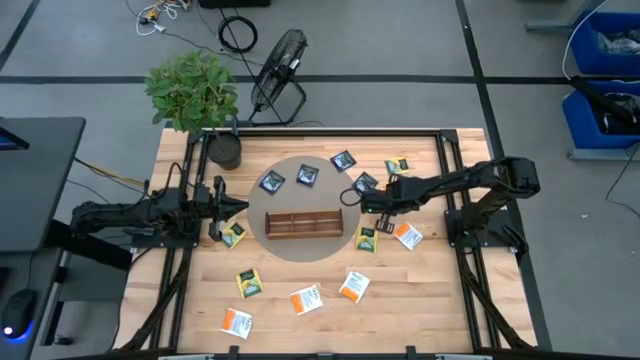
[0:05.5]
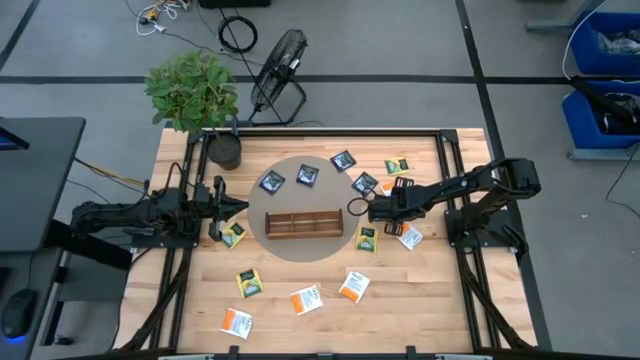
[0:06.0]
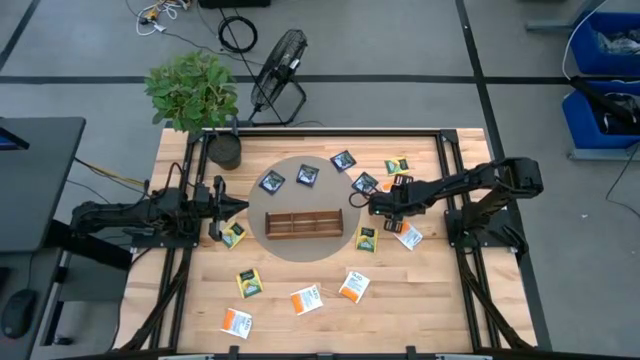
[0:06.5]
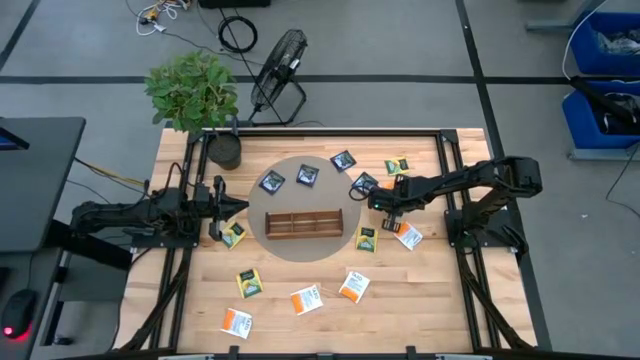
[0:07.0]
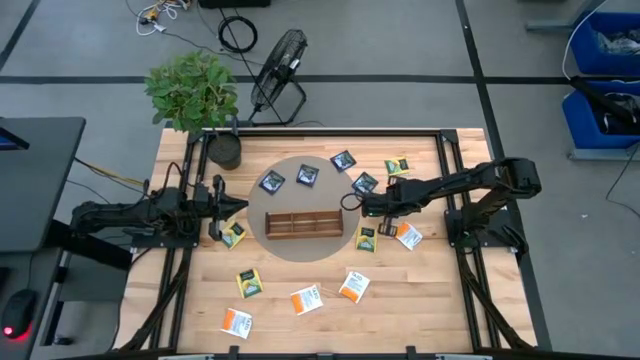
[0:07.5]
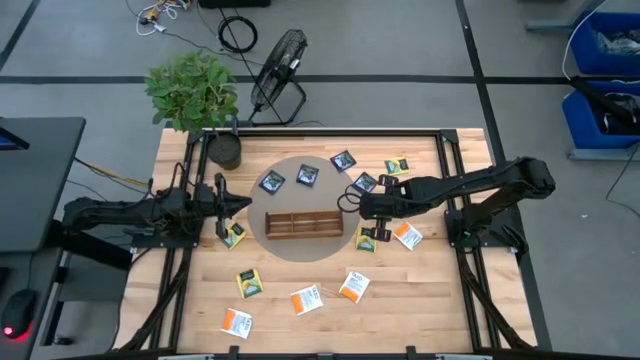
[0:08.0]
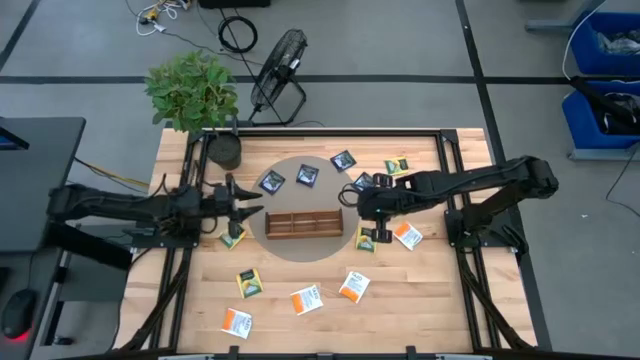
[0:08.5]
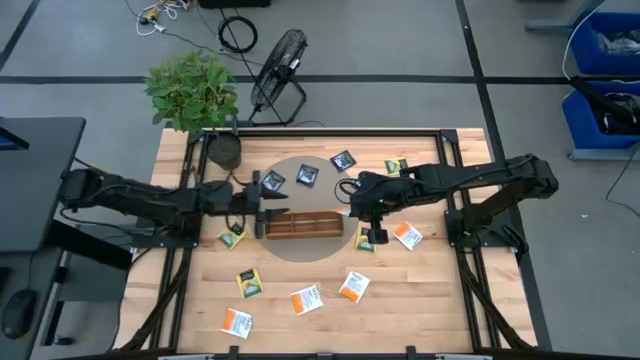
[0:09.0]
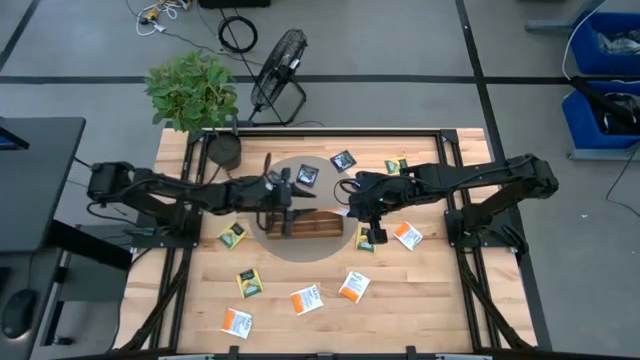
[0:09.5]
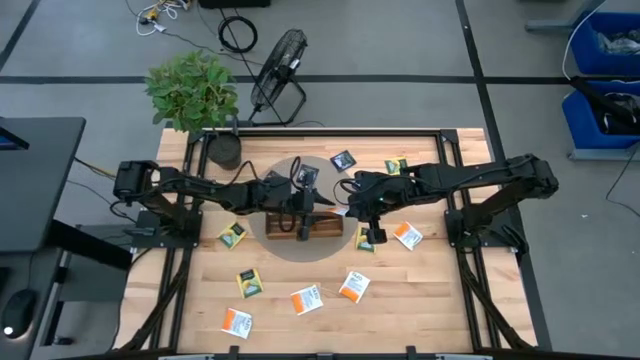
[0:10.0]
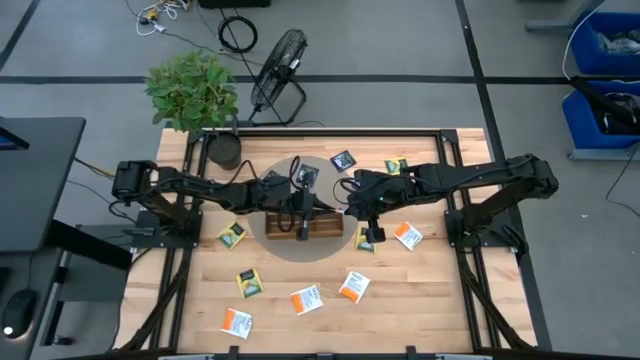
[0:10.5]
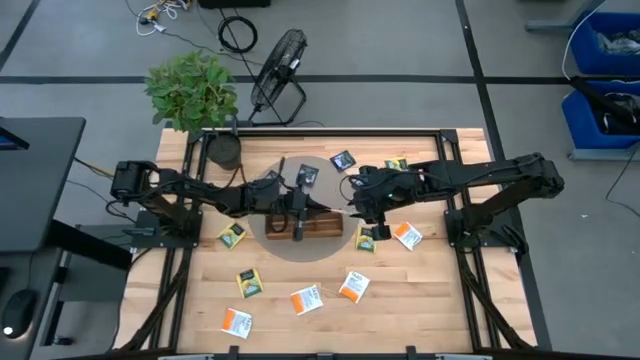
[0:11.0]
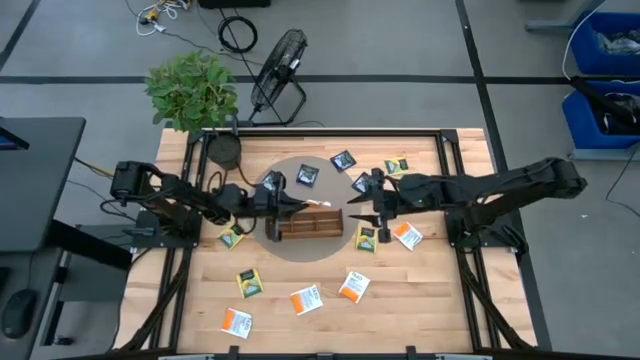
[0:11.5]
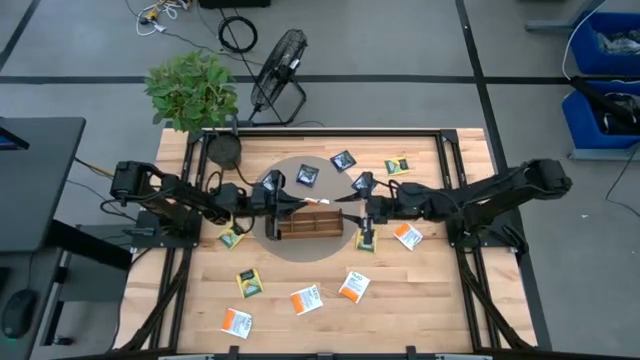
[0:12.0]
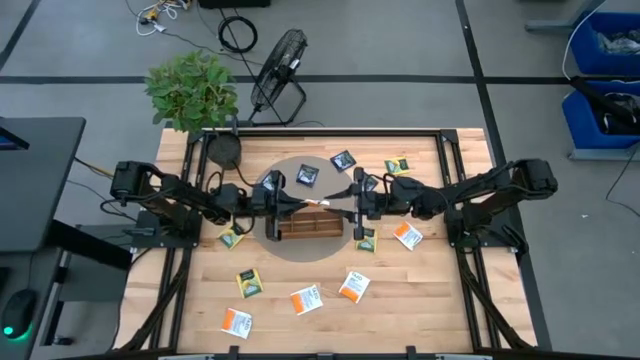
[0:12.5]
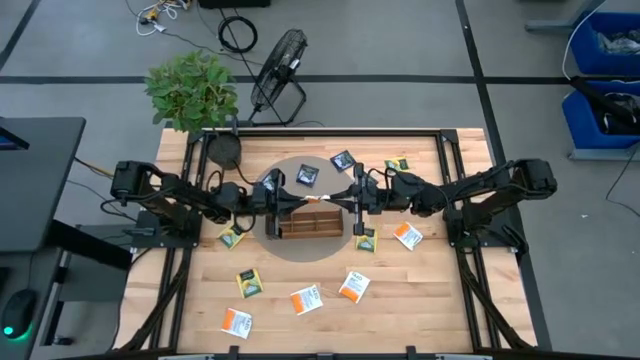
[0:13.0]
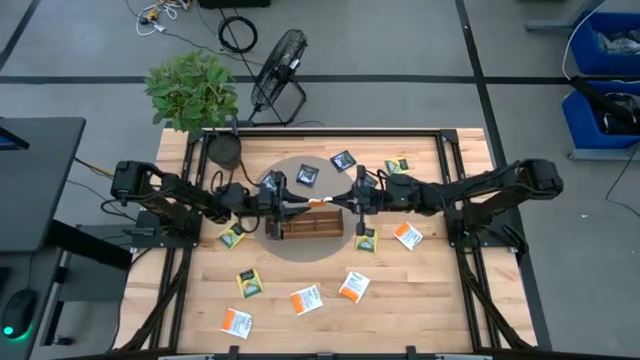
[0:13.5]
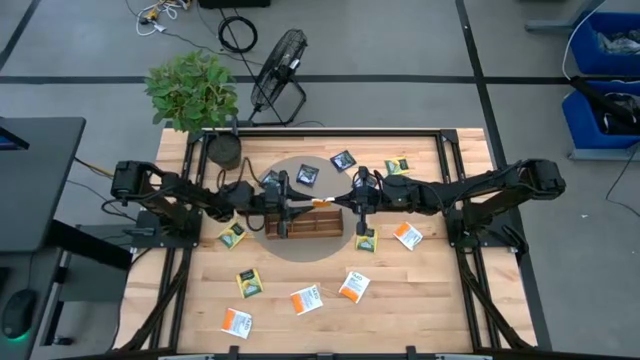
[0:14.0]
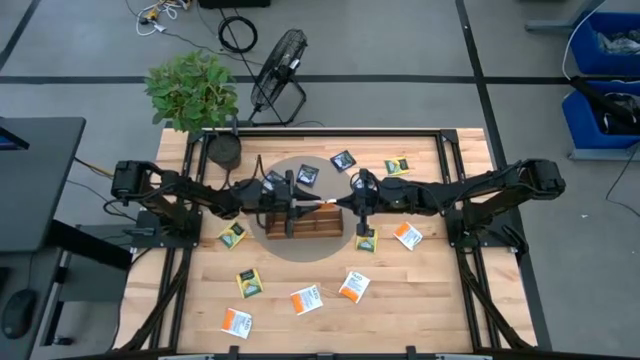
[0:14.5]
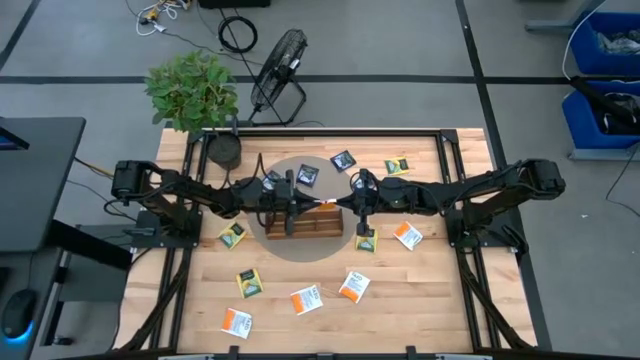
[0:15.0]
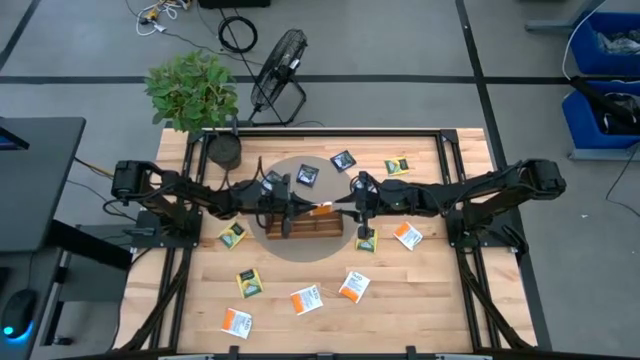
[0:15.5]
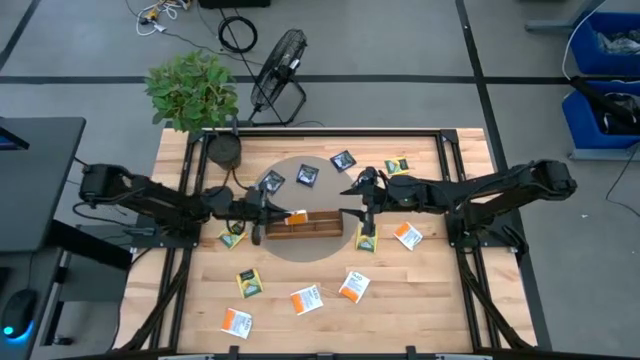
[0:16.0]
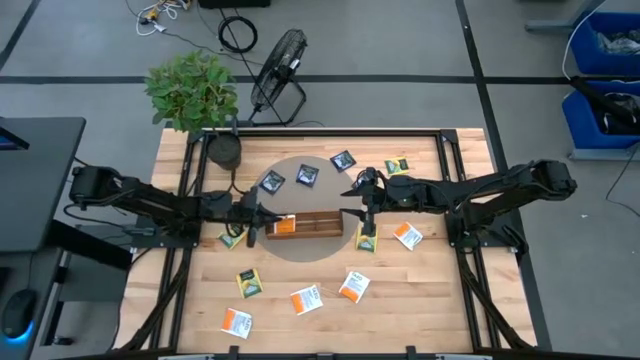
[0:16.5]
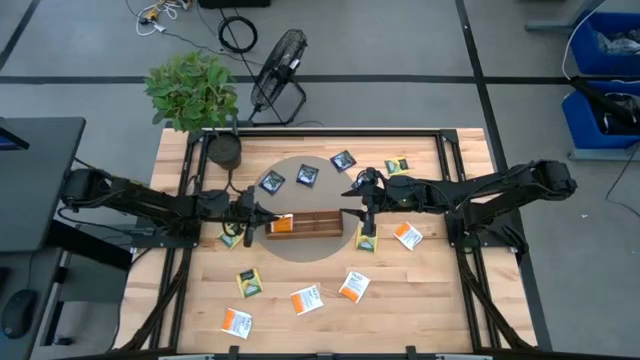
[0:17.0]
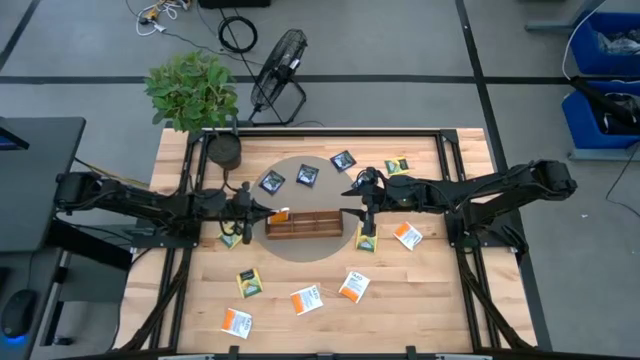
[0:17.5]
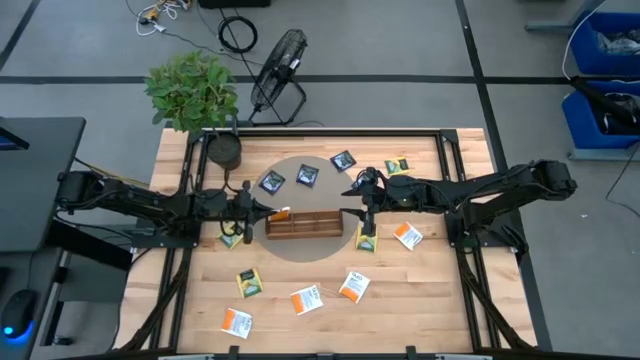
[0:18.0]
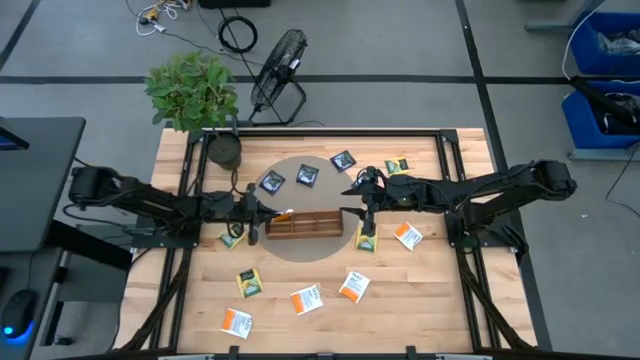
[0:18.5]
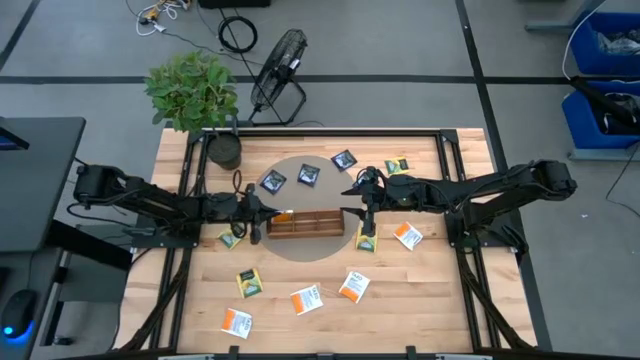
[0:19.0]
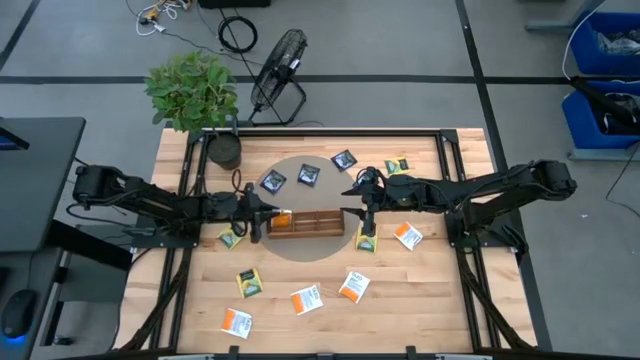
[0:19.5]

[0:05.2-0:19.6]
Task: Pick & Place Tea
Put the orange tea bag into the left compartment of the wooden organizer

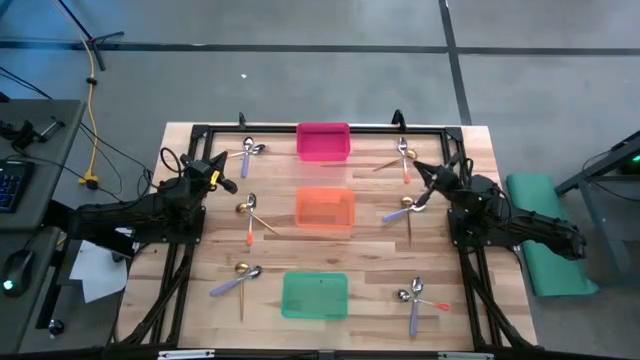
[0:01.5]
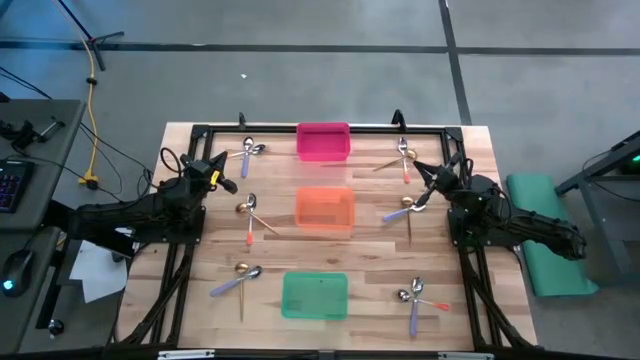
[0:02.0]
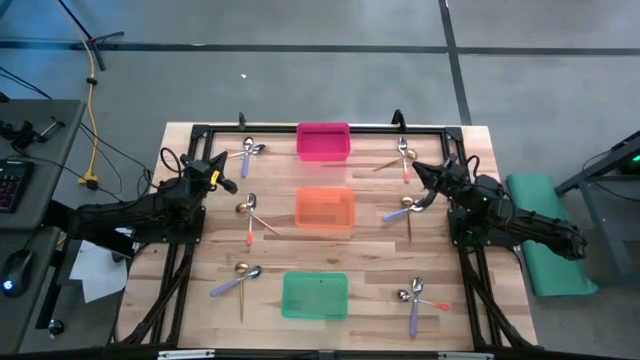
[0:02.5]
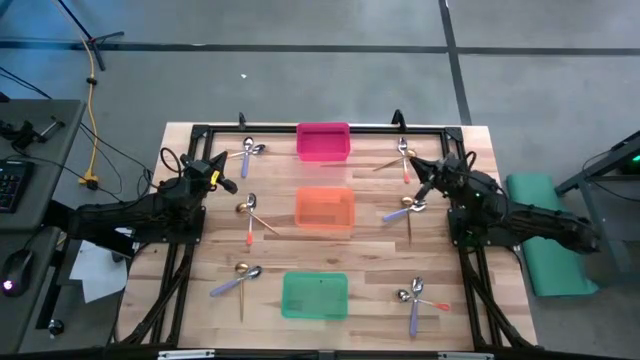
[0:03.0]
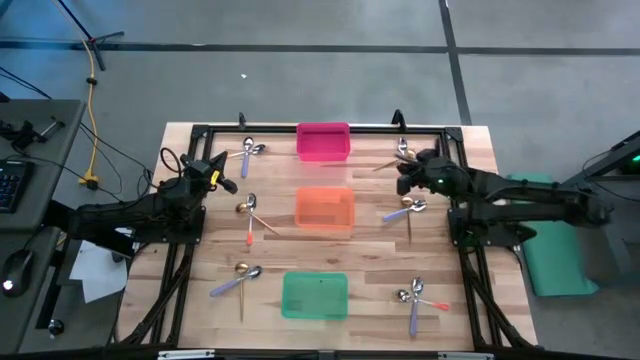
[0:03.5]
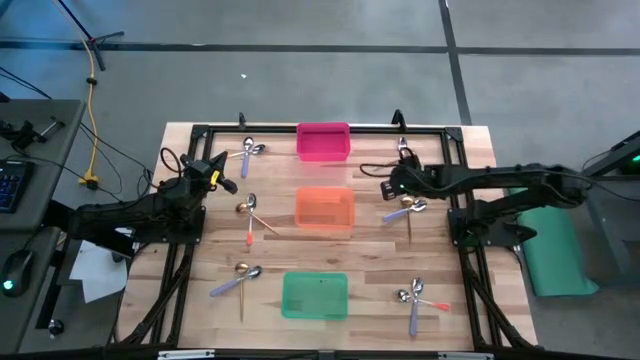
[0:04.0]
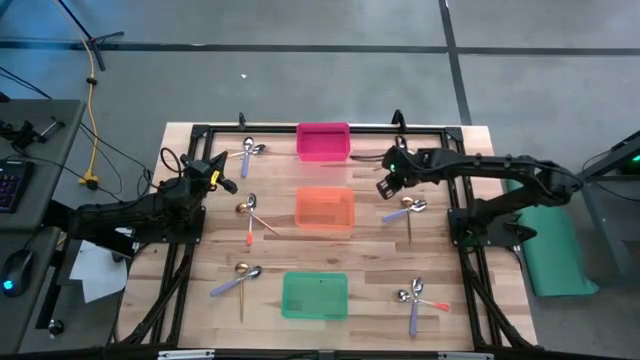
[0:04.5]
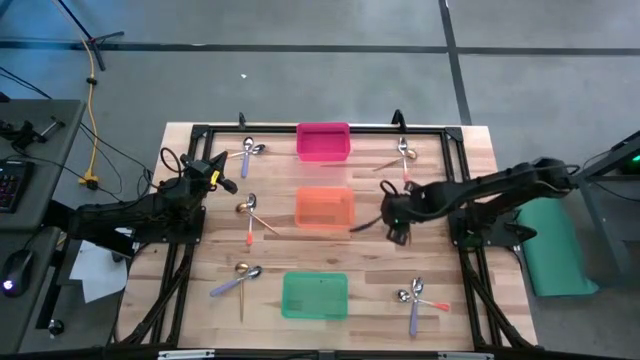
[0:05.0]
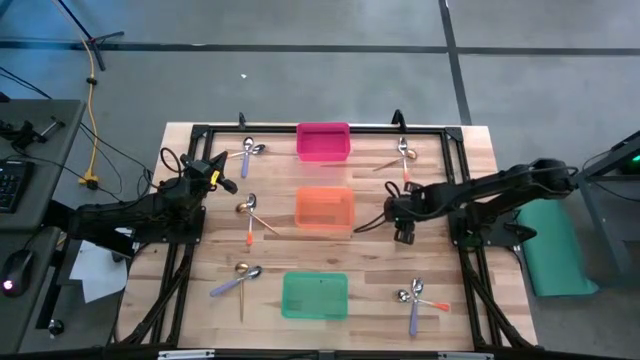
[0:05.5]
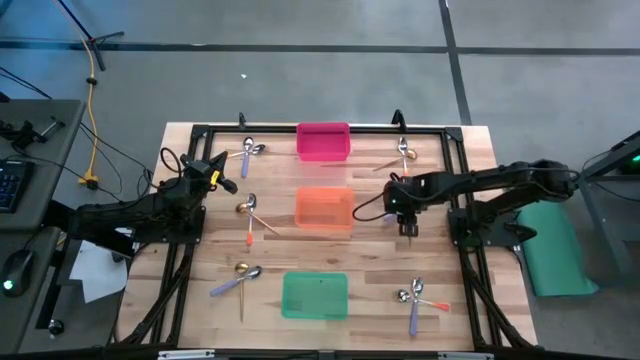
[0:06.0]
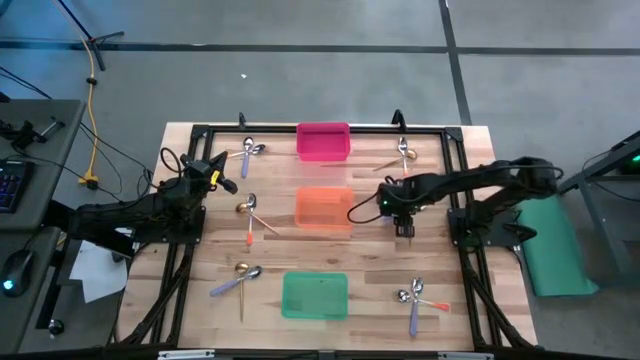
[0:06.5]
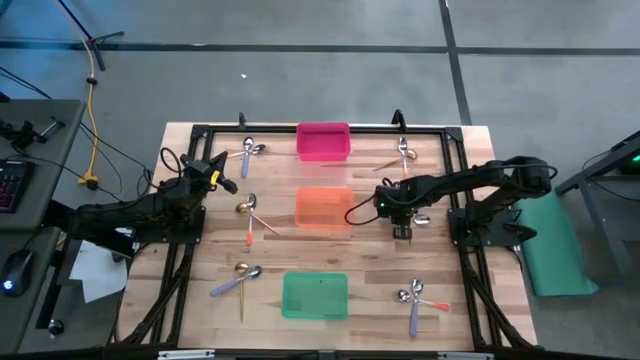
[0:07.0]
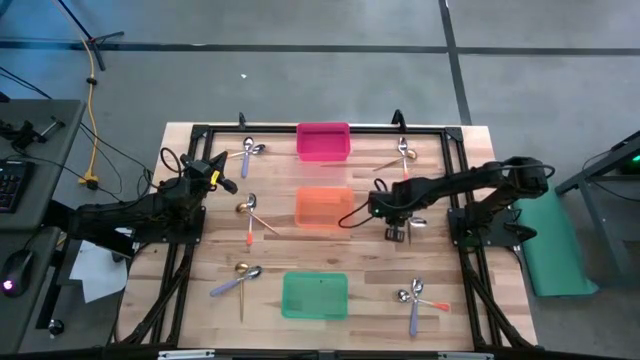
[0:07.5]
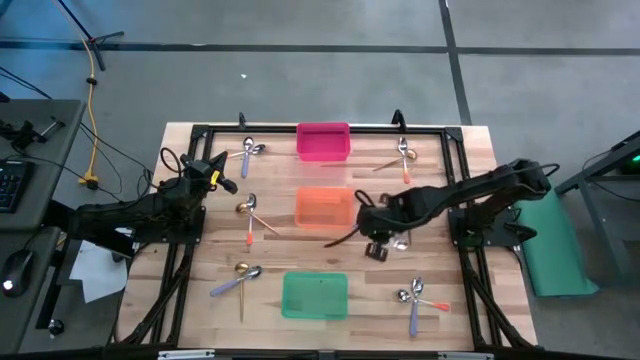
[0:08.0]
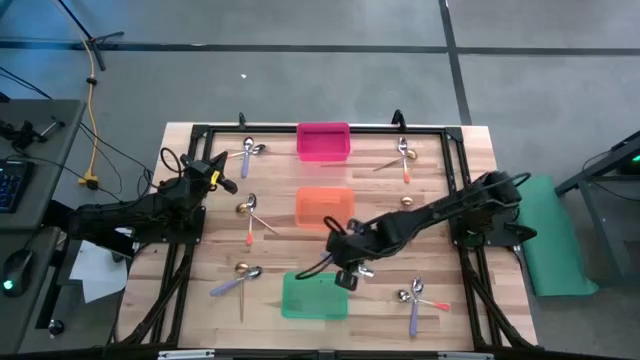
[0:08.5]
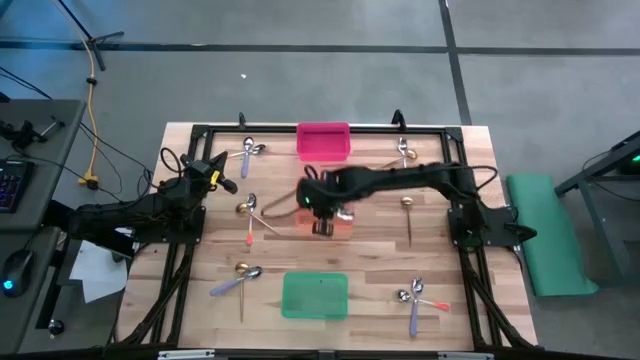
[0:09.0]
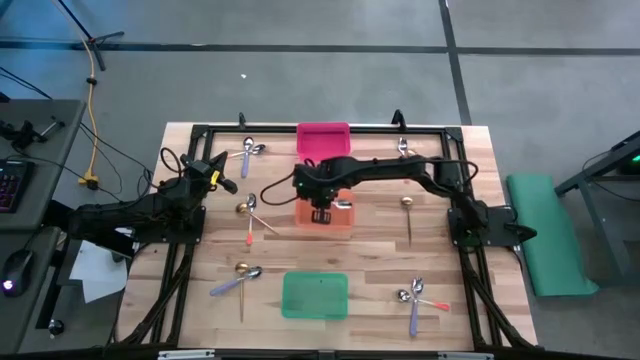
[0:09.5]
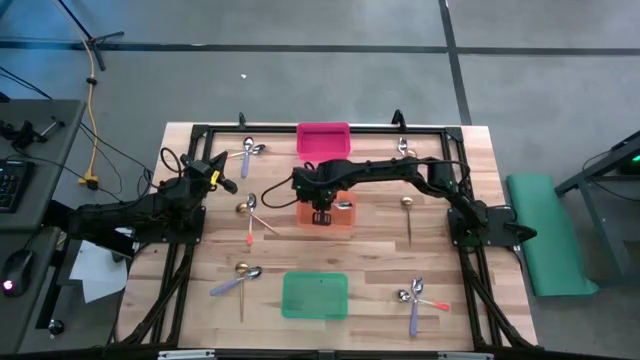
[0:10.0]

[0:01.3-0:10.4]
Task: Sort silverware by color (type)
Put the middle violet spoon into the orange bin
